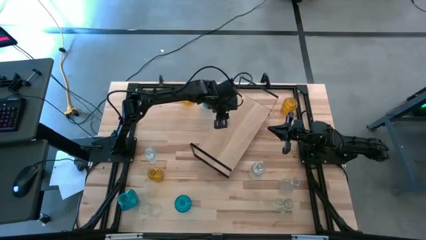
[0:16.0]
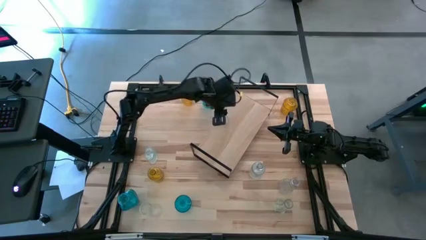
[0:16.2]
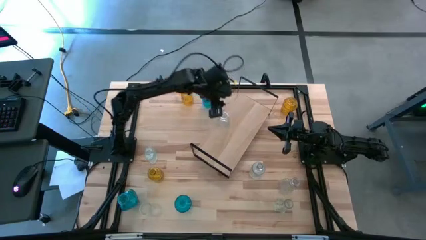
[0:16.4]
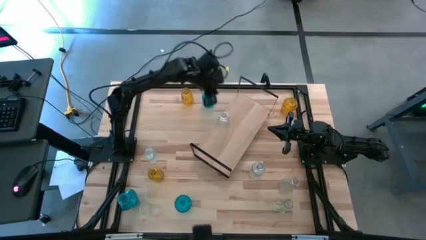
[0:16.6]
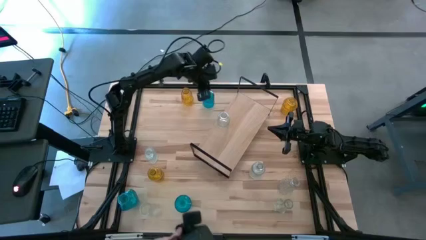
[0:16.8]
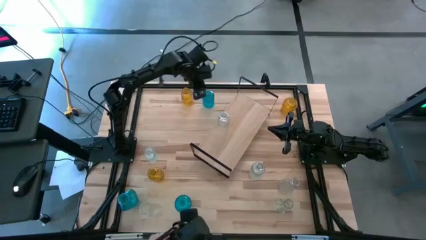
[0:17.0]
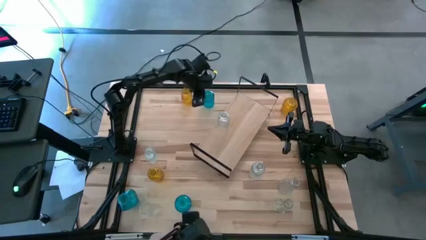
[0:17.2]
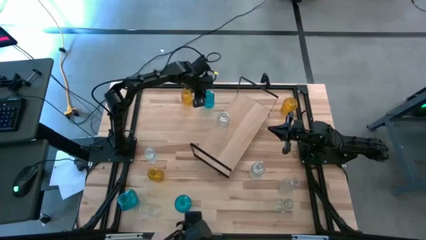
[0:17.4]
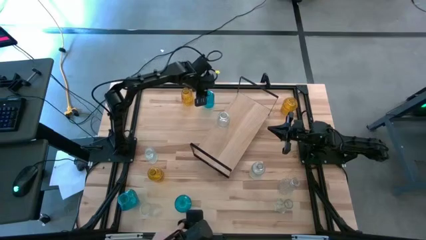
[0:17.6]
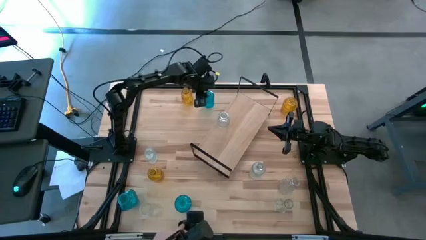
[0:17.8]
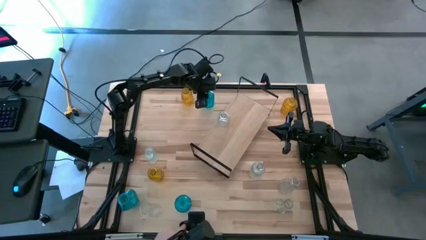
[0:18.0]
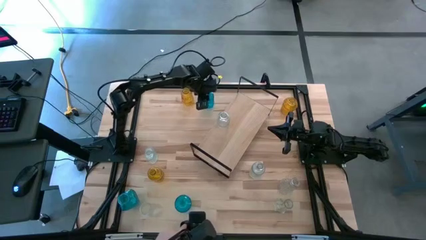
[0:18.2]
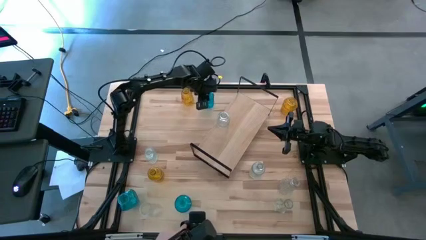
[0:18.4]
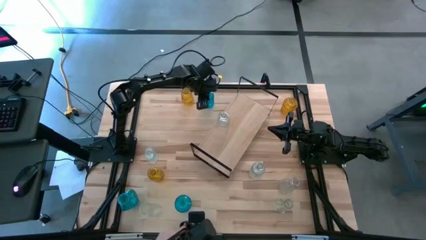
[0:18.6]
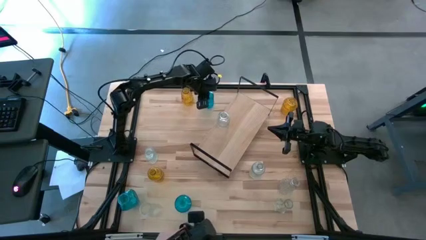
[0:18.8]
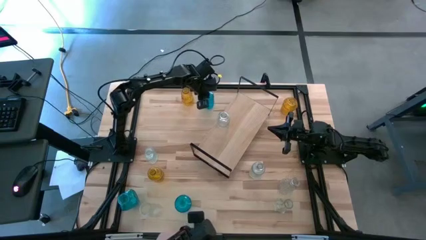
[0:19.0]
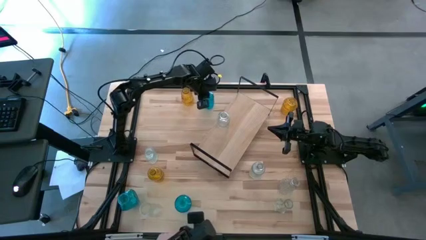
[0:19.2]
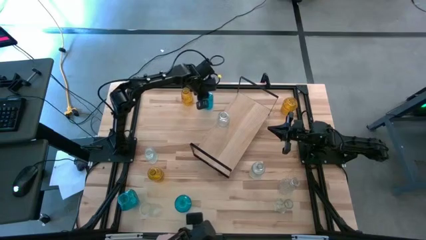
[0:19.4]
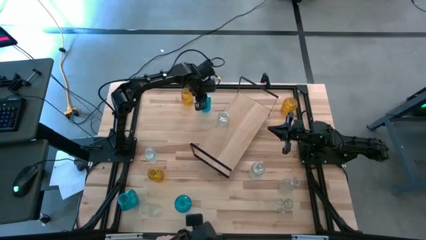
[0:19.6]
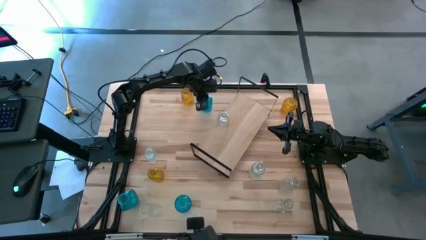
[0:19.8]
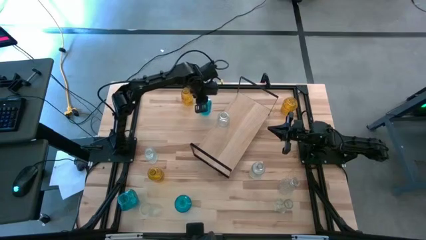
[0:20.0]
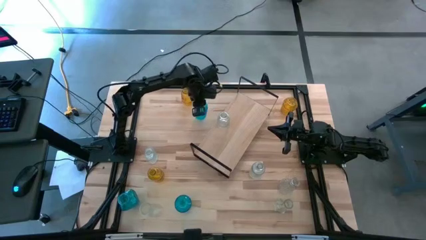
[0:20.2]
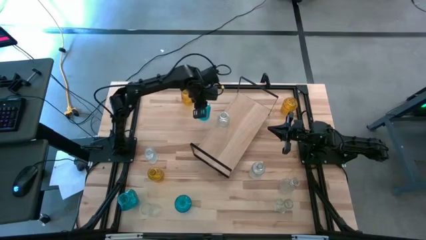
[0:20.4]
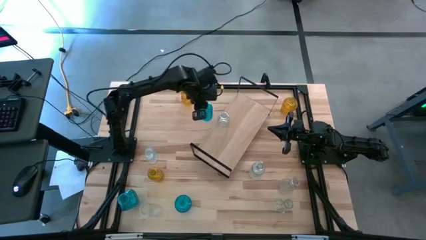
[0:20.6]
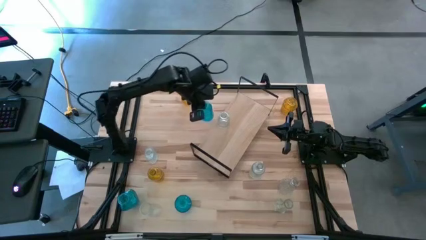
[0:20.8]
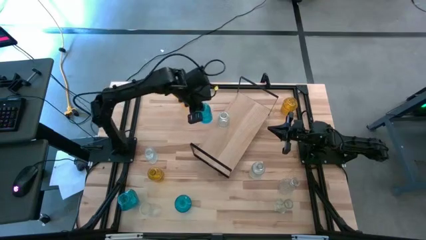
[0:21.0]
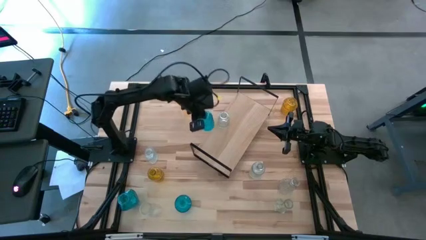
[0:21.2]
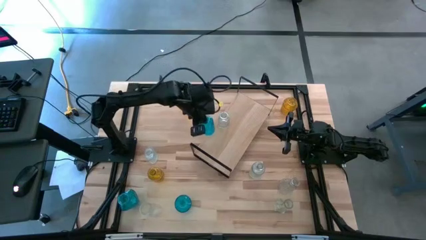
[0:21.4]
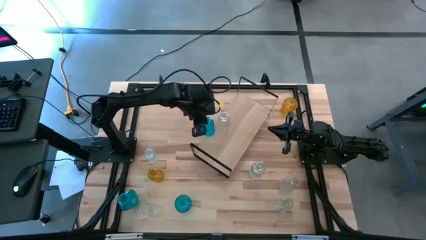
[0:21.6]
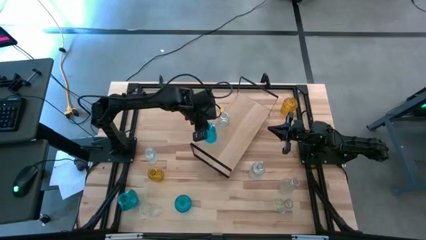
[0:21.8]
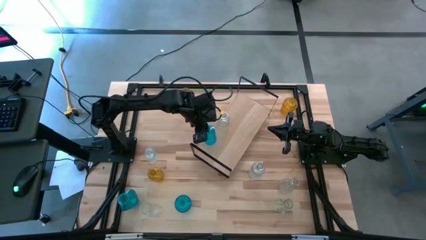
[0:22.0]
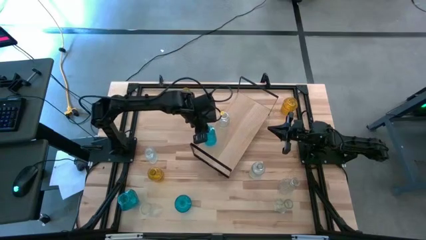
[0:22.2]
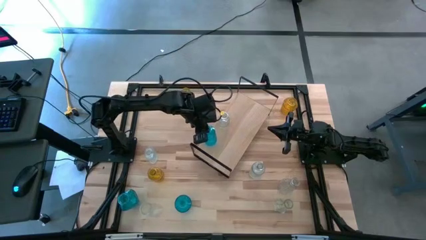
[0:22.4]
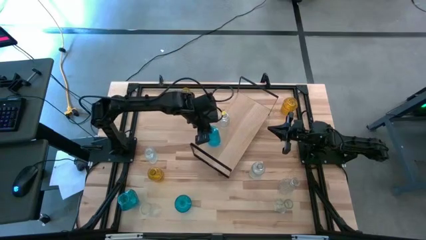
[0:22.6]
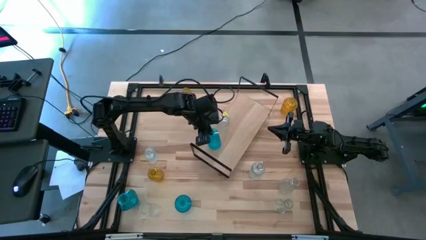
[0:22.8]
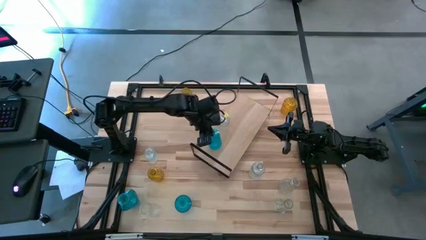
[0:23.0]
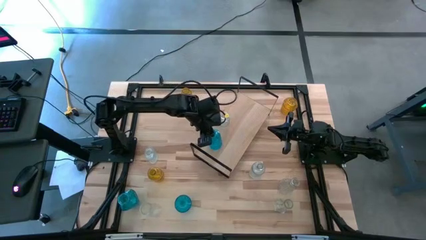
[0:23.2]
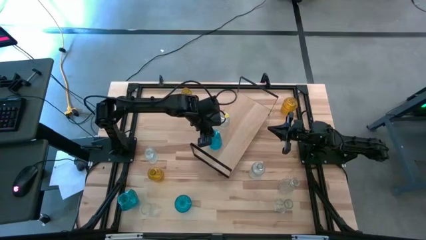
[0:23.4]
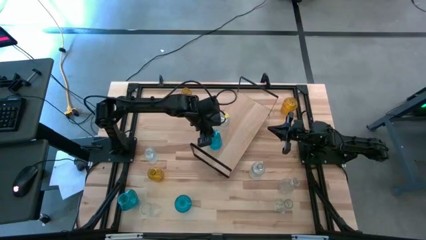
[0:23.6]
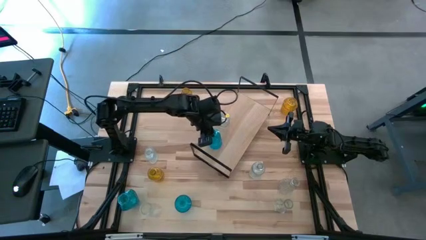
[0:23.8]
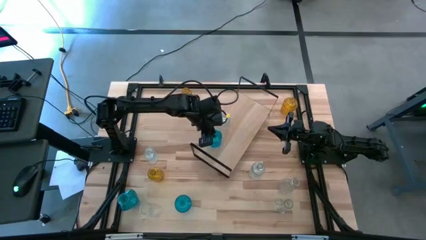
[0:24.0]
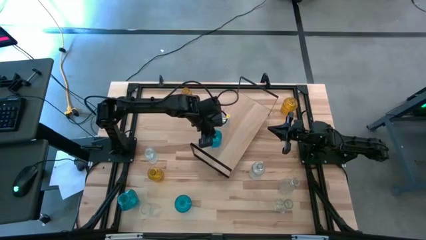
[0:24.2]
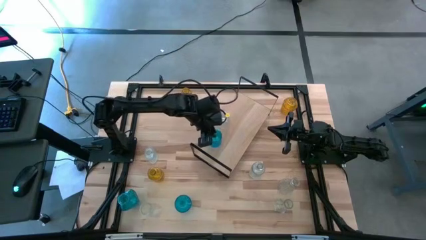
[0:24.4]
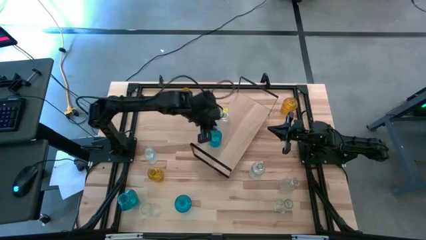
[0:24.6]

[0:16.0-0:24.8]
Task: sort vases onto shelf
Put the top right blue vase on the shelf

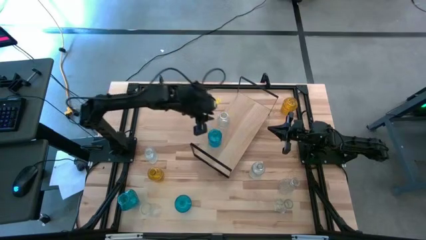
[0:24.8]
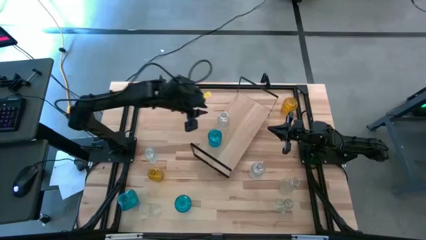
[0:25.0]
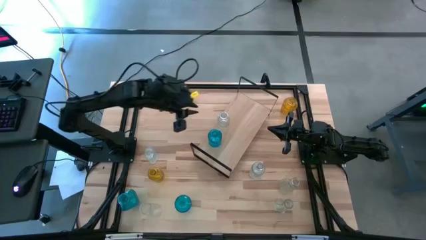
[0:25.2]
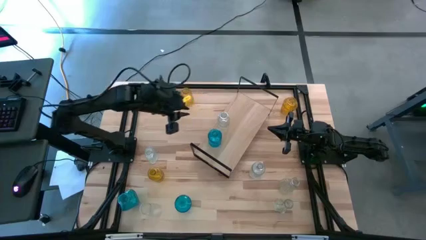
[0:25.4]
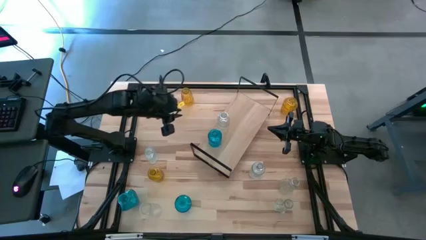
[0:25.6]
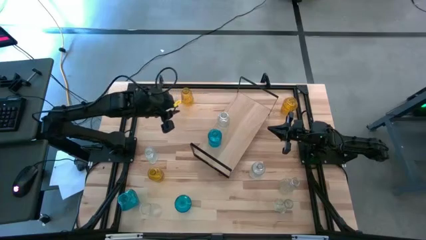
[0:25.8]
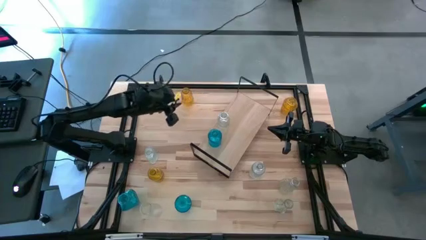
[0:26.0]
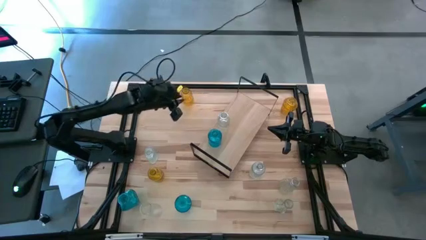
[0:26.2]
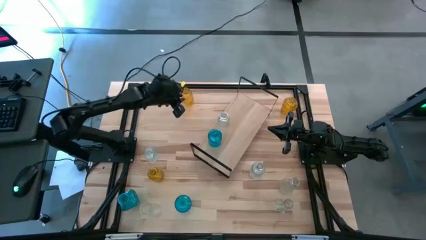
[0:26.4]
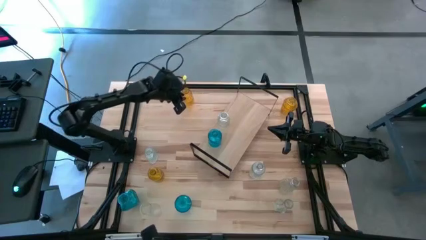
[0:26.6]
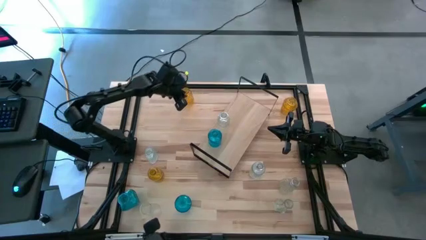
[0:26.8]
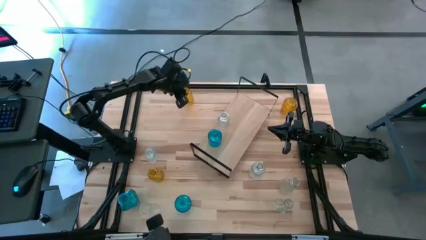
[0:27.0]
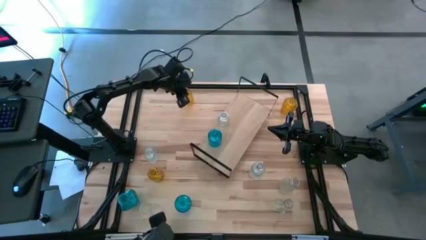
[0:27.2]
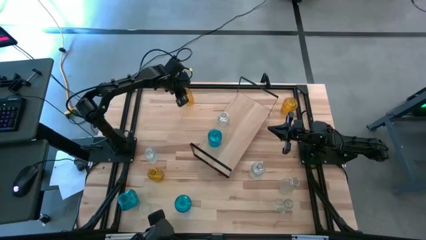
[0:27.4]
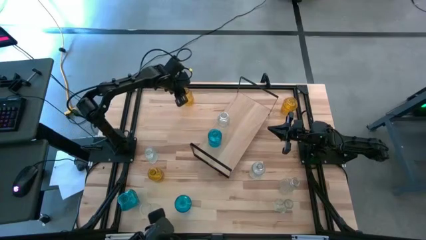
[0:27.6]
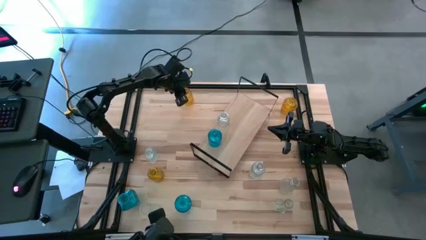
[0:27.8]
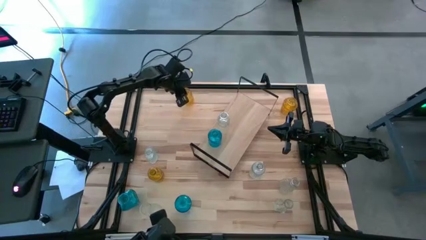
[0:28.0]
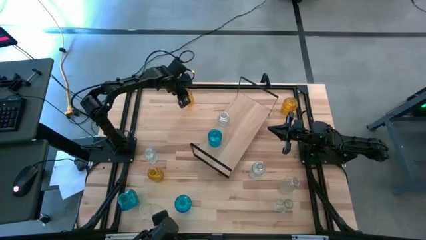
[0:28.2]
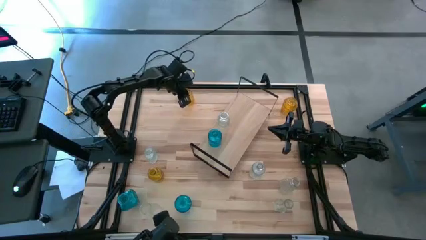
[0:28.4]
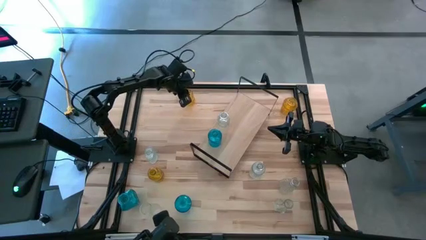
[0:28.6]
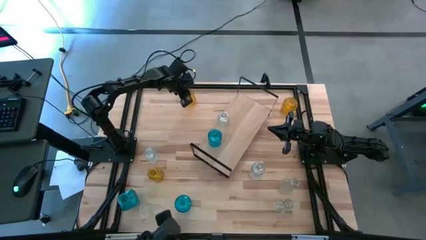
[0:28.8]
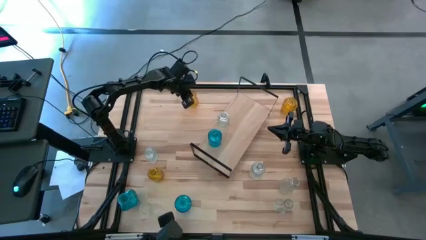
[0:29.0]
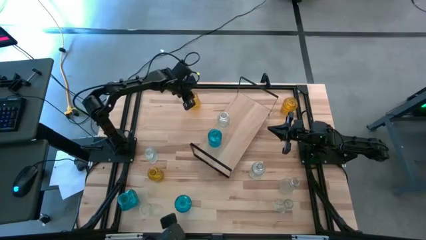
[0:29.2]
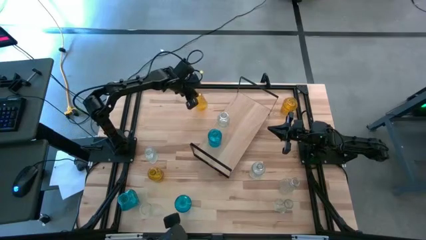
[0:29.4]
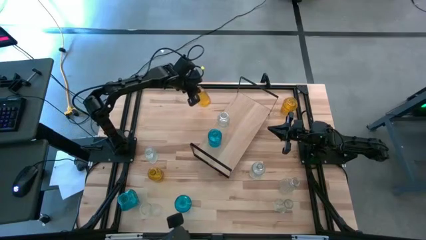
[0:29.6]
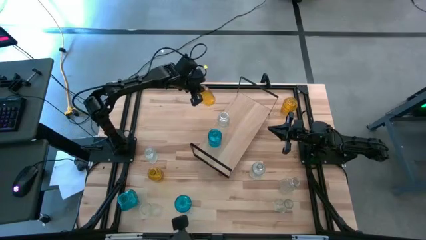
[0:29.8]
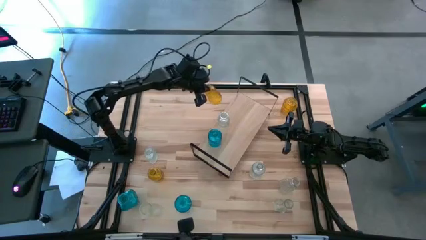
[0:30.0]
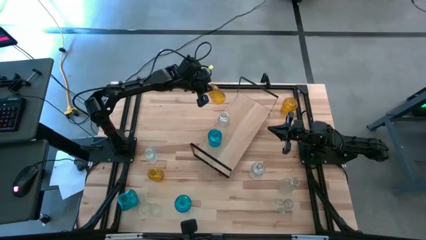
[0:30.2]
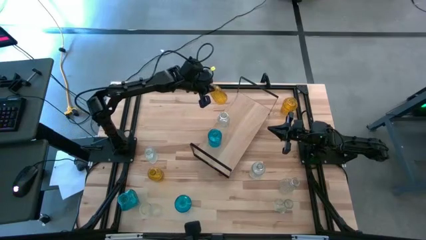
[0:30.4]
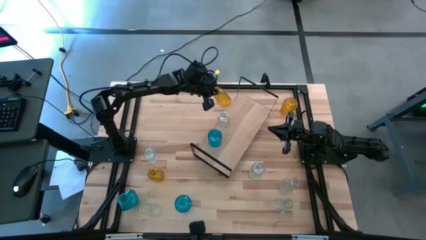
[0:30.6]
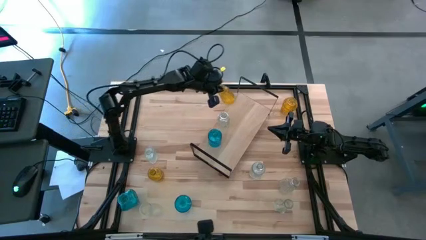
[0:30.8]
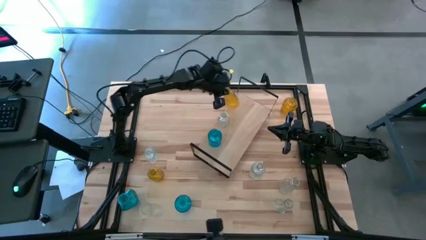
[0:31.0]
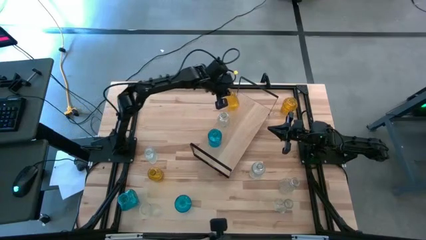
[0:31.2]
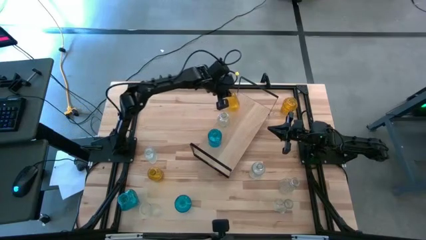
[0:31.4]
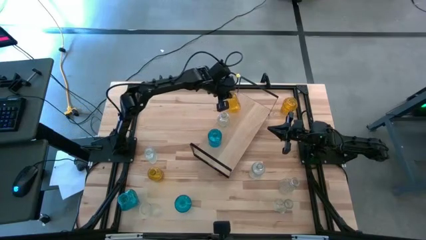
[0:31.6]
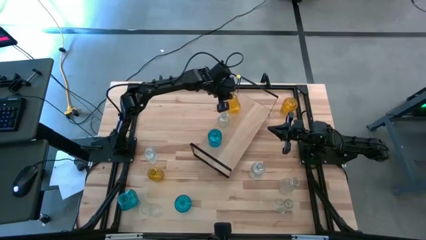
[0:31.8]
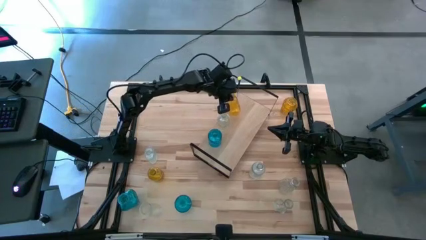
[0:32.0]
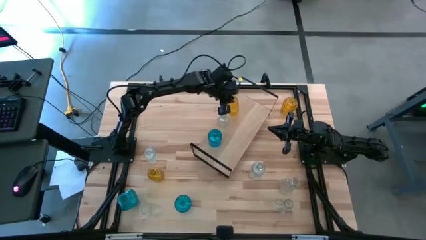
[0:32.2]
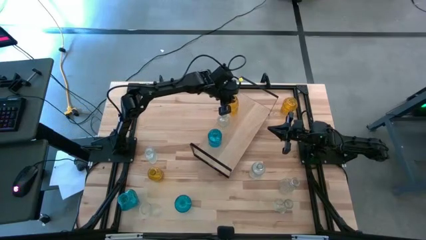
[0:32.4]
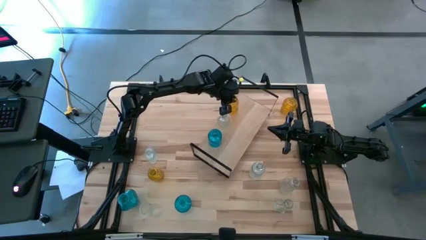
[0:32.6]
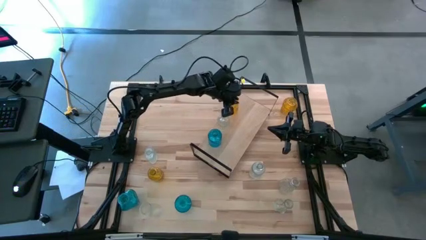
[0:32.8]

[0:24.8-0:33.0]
Put the middle top left yellow vase on the shelf
